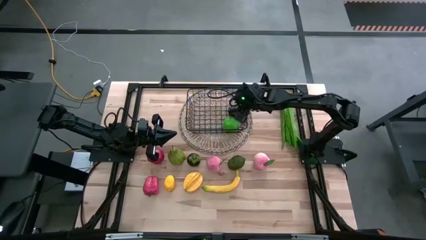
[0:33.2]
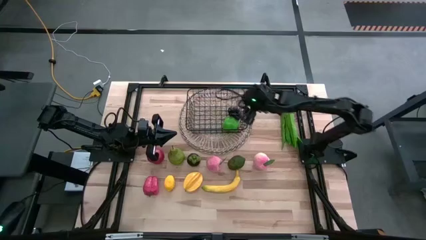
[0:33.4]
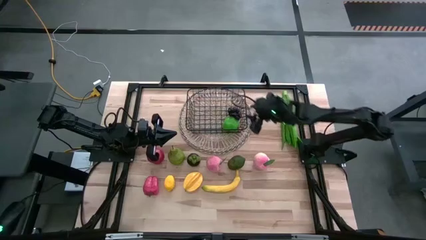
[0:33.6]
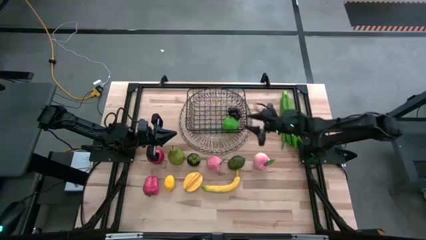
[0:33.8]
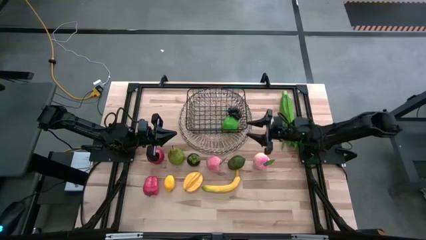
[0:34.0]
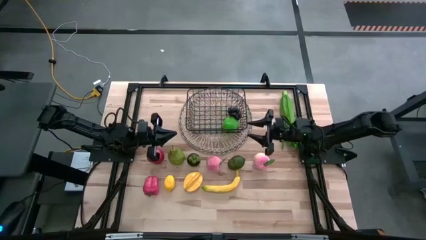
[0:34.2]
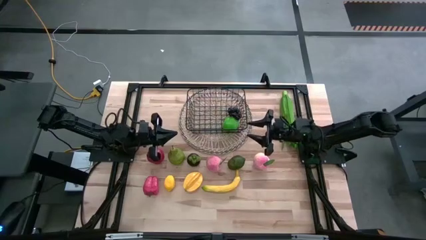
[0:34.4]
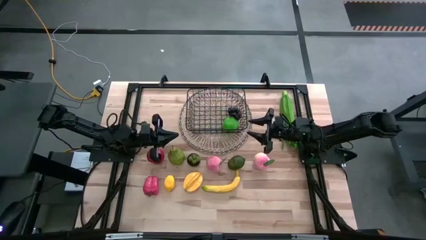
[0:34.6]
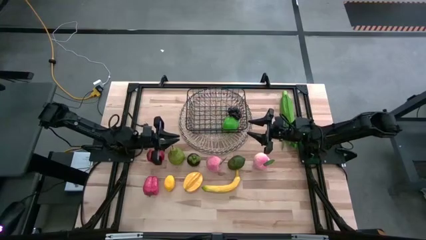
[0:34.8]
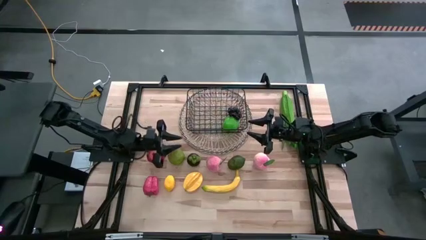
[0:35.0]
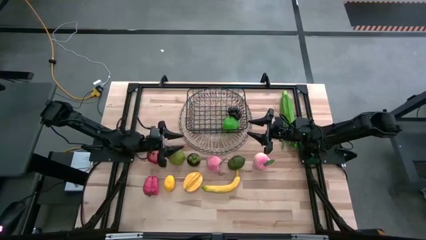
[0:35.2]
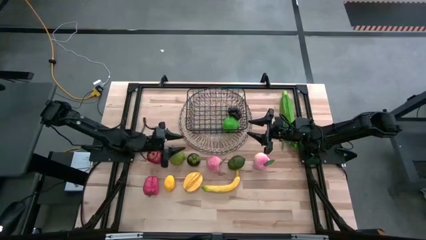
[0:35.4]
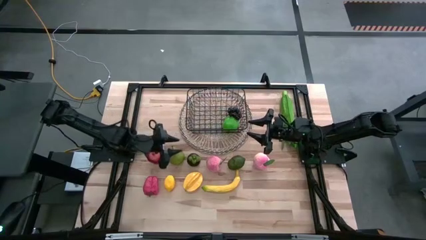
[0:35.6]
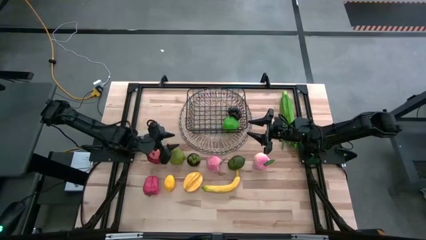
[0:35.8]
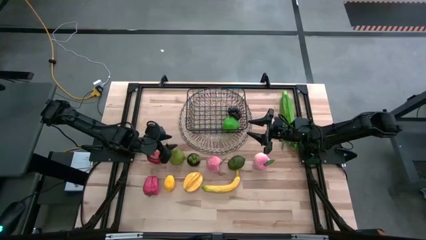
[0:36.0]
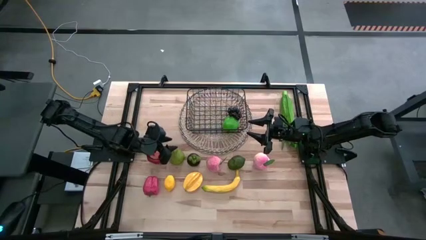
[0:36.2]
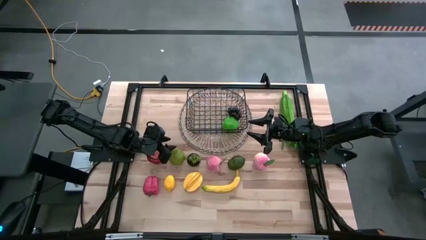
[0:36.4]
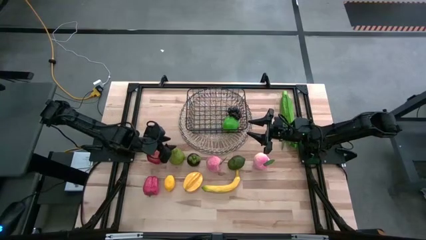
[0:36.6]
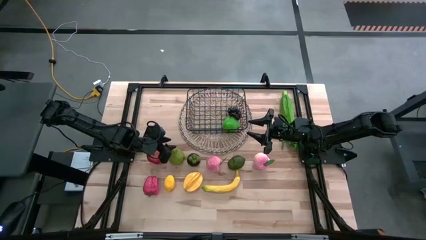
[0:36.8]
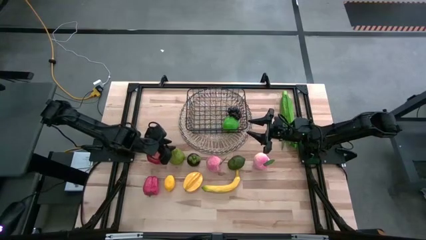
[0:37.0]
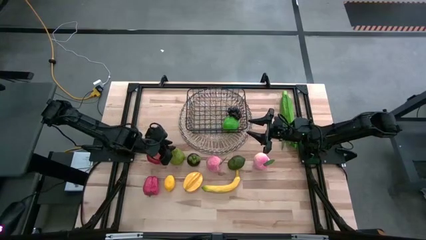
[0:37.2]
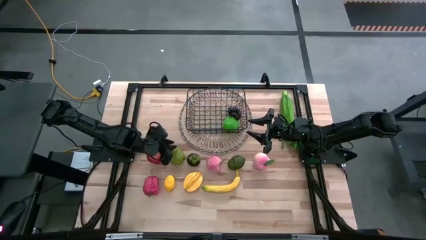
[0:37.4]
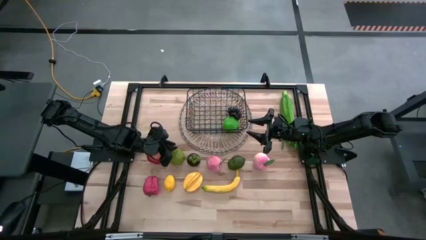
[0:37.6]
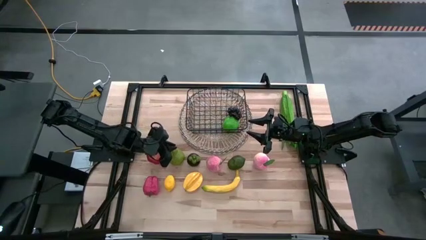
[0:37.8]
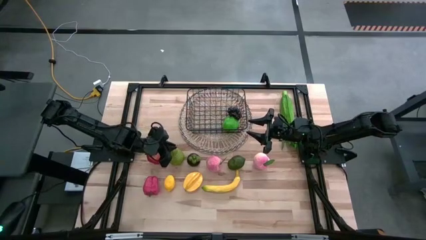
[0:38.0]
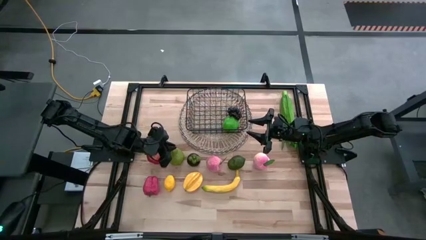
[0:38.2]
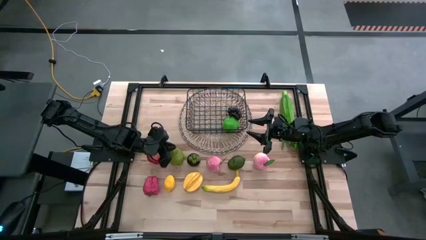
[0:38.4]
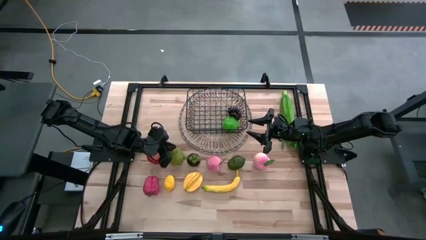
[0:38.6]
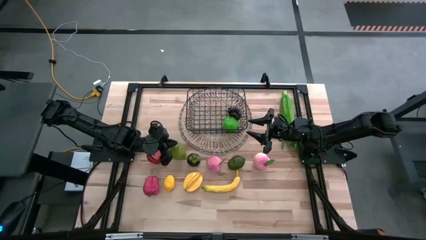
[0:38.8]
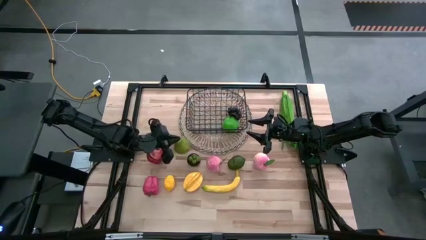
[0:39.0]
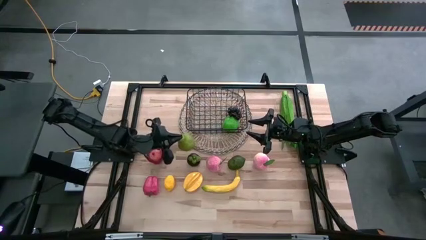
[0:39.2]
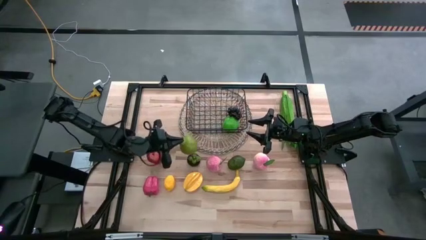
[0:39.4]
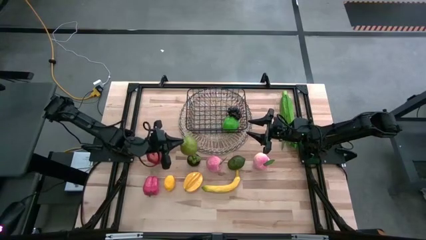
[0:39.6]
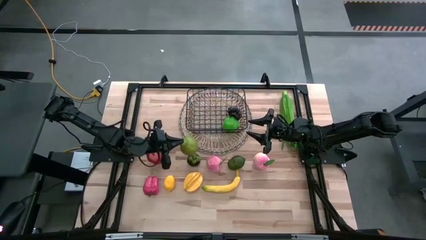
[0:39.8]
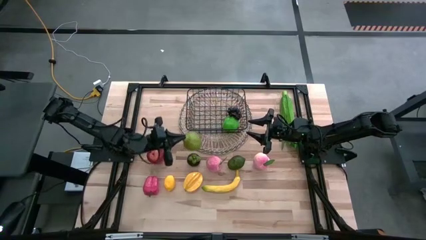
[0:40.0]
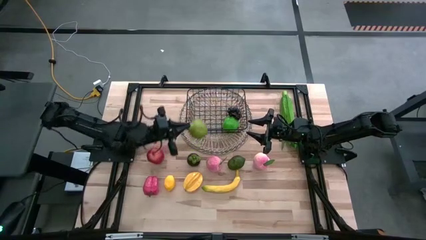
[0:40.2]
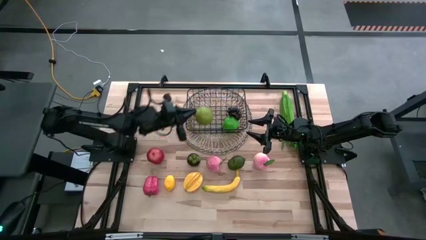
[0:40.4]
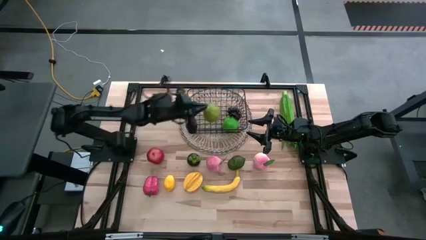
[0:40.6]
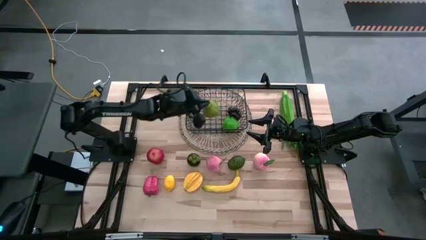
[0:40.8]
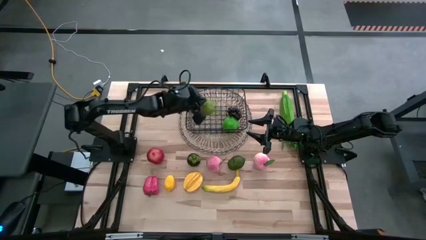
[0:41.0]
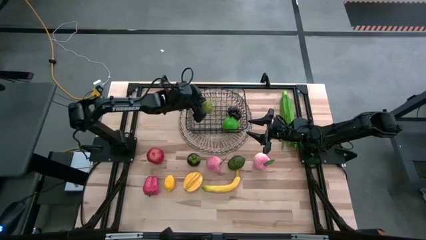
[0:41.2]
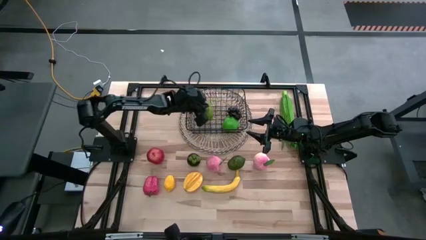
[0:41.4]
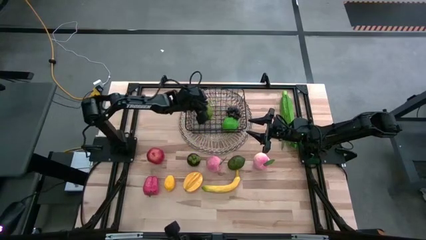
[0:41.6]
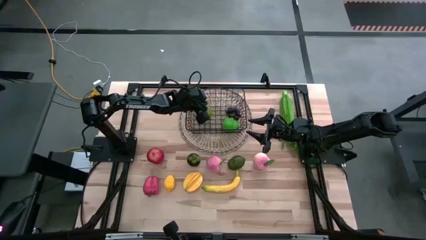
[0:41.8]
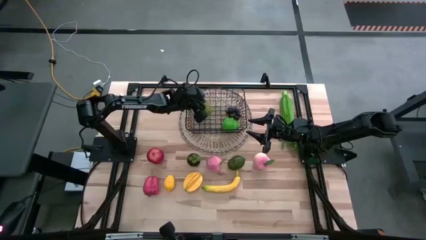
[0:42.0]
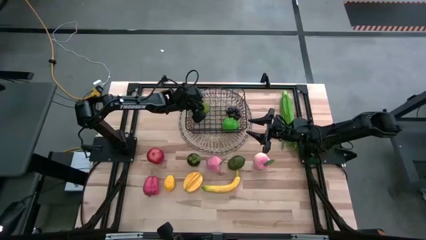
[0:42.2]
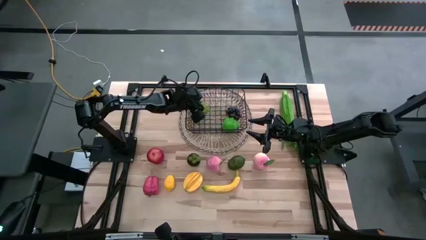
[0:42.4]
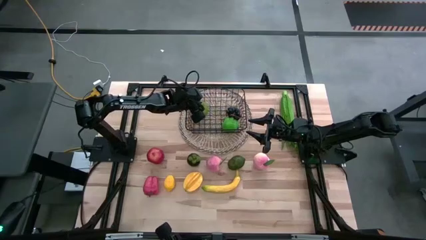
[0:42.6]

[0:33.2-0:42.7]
Task: Build produce basket
Put the pear into the black wire basket

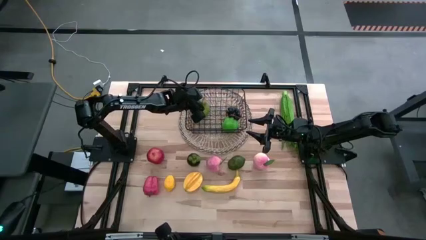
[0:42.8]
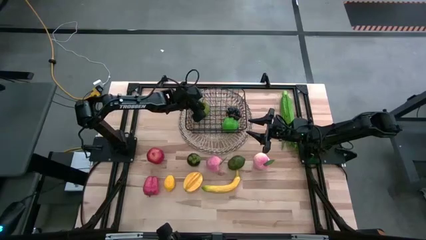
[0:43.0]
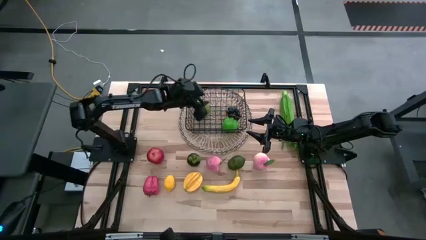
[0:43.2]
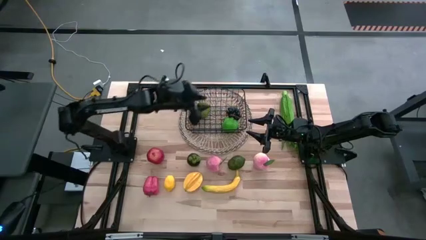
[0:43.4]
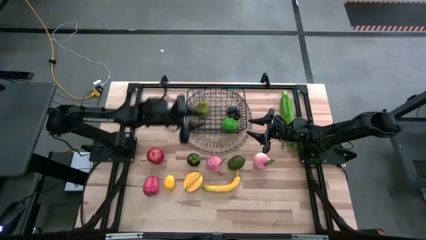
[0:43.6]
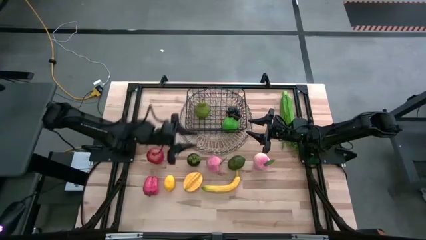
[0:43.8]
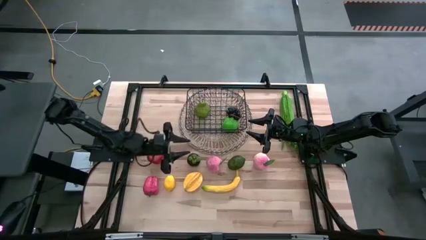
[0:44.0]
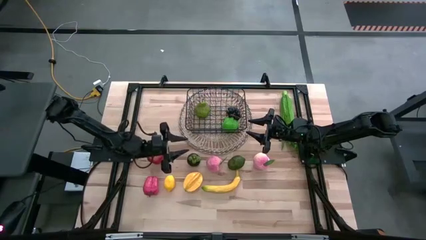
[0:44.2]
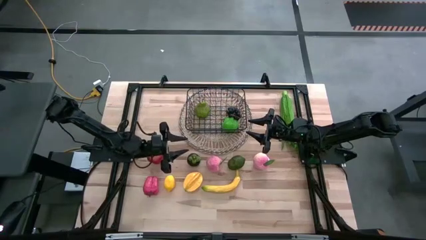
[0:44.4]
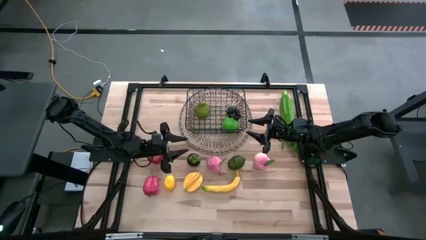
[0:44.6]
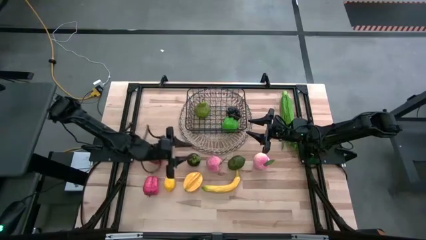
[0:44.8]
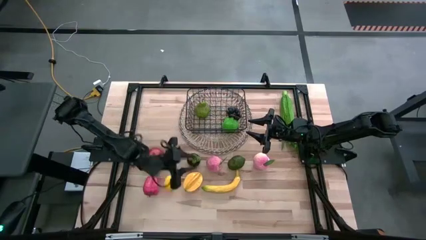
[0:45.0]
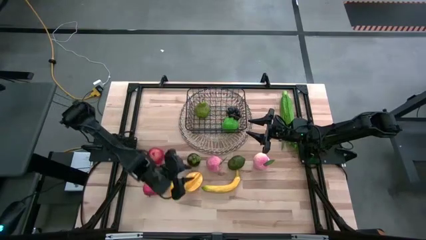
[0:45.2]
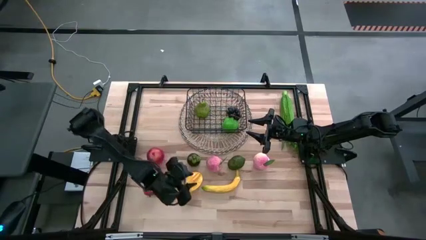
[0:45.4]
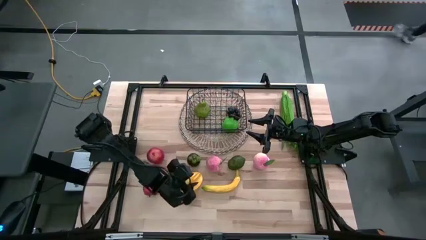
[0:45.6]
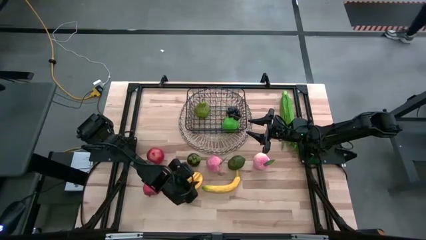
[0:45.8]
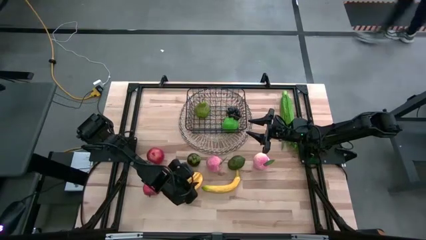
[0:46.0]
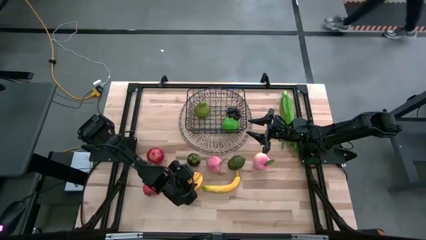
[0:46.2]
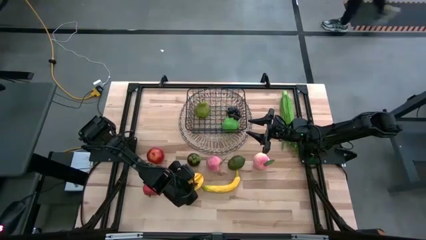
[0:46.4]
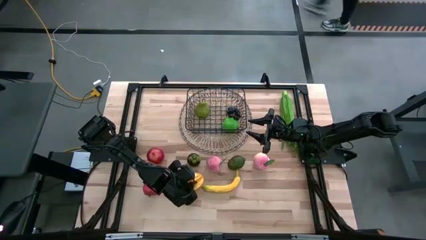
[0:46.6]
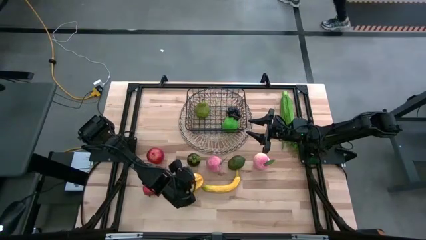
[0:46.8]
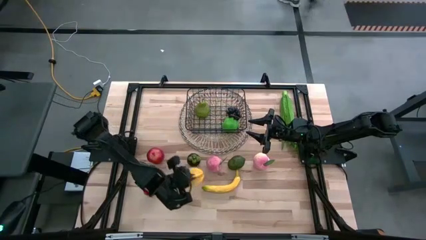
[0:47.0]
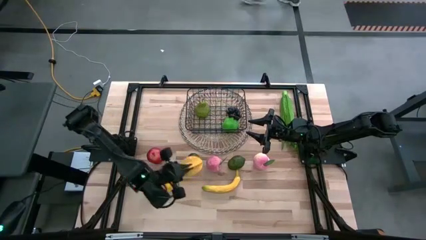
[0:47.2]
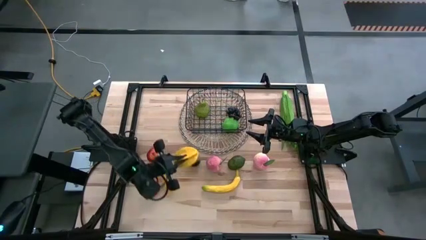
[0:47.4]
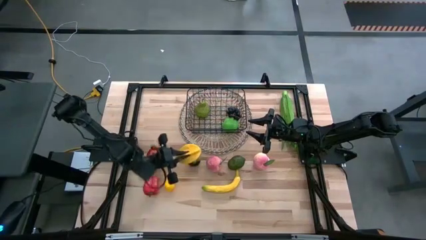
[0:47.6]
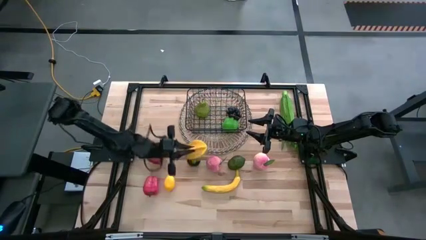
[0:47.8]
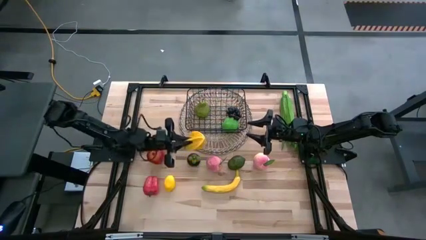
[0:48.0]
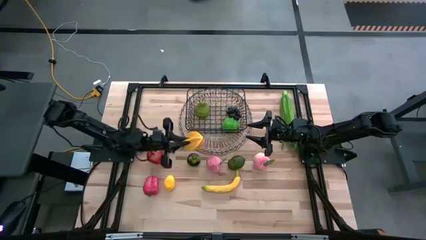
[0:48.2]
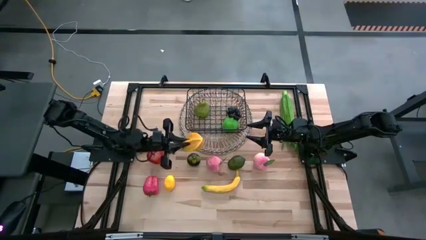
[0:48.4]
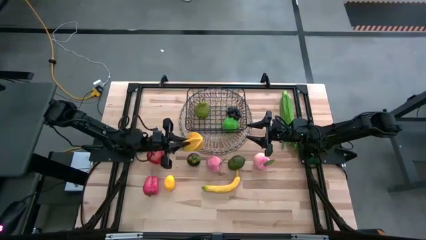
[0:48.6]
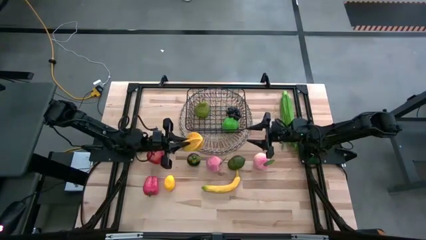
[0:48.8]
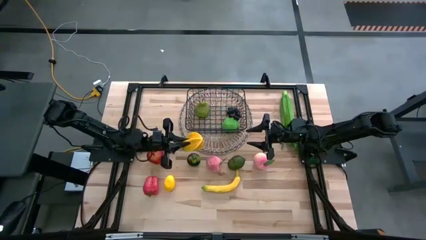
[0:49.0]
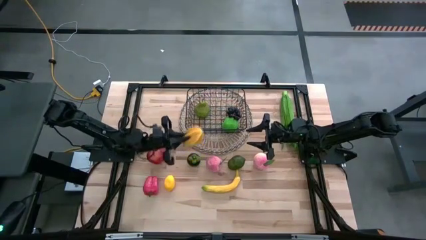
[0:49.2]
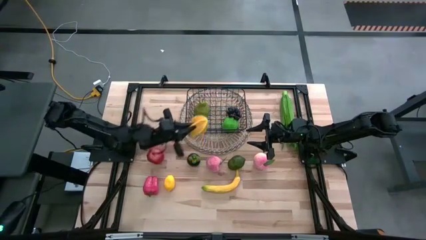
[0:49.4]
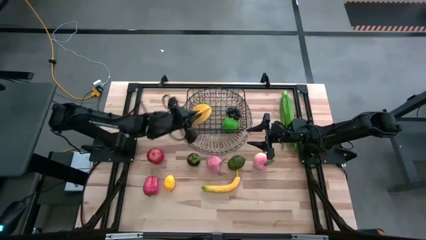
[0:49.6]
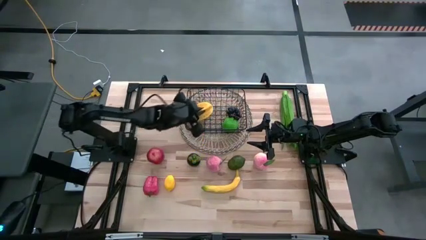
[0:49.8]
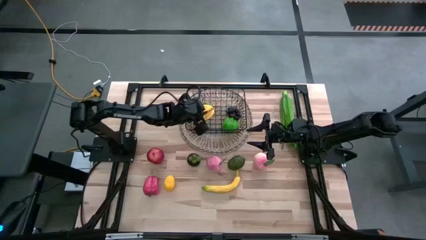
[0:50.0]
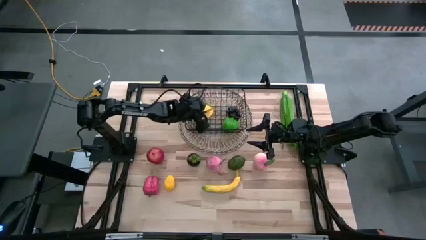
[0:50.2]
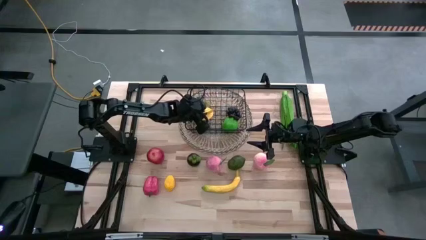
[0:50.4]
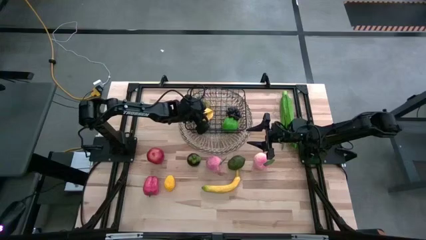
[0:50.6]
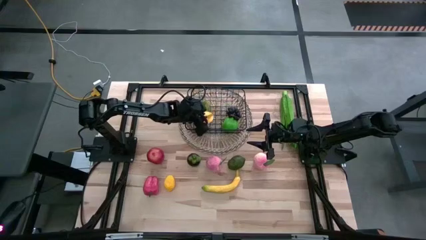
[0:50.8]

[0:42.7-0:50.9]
Put the starfruit into the black wire basket
